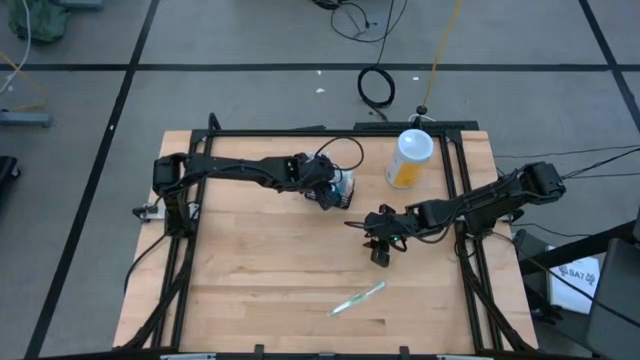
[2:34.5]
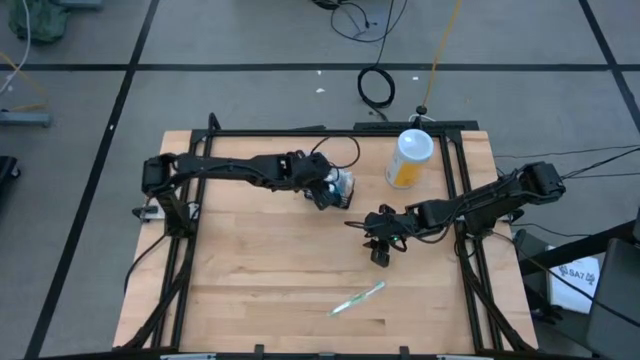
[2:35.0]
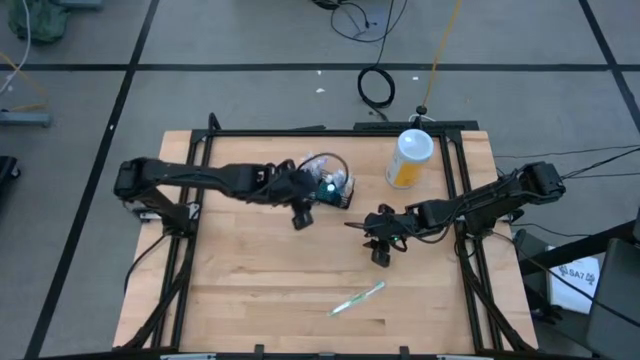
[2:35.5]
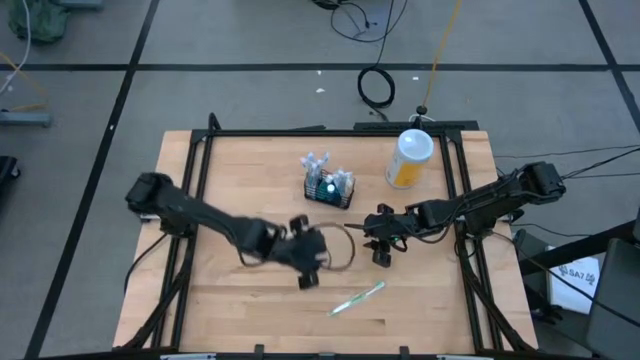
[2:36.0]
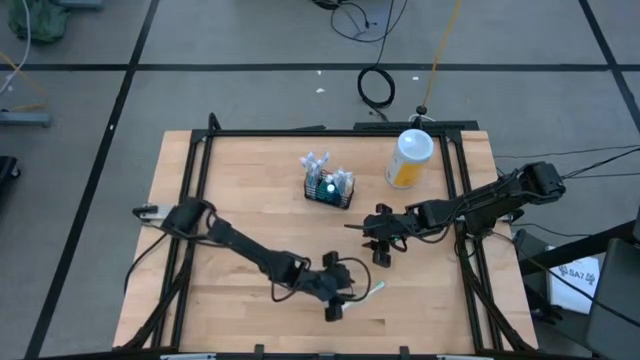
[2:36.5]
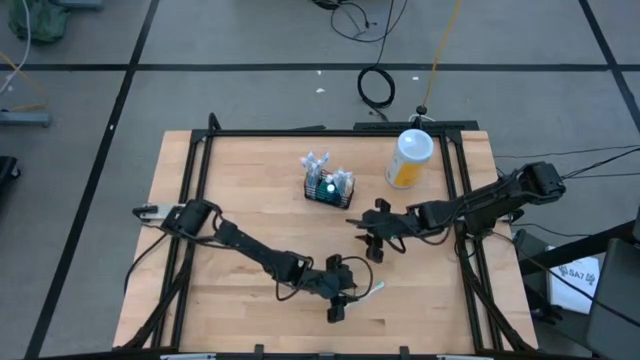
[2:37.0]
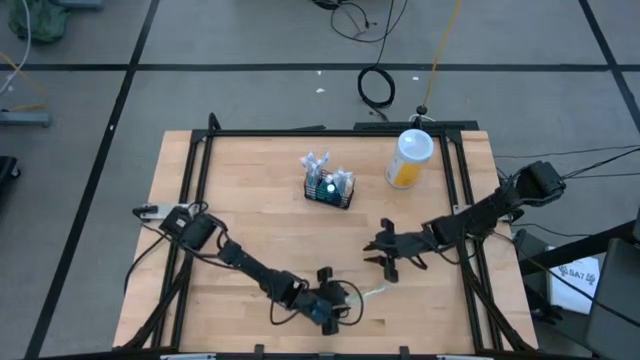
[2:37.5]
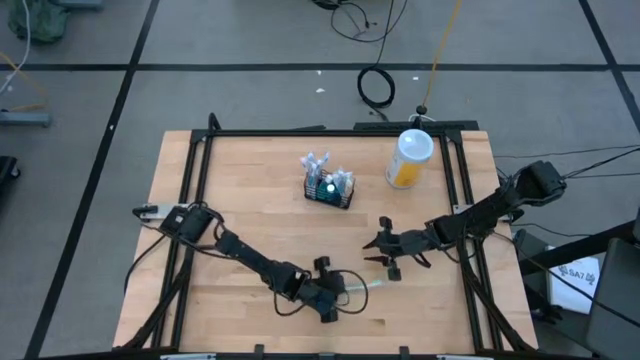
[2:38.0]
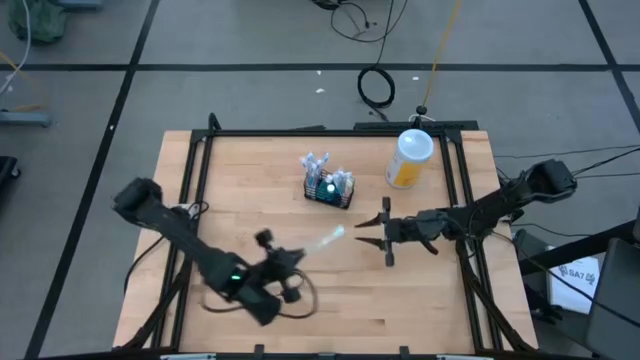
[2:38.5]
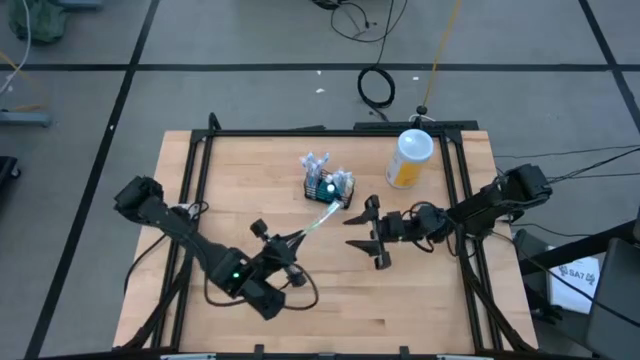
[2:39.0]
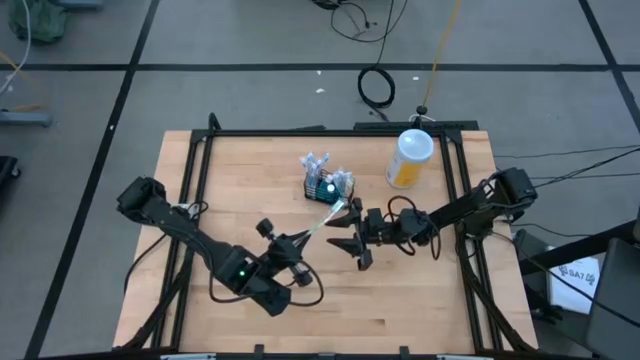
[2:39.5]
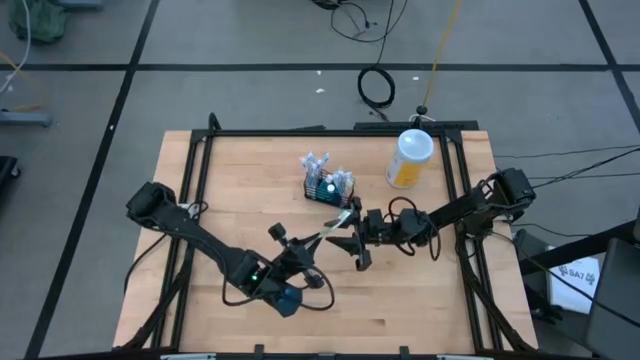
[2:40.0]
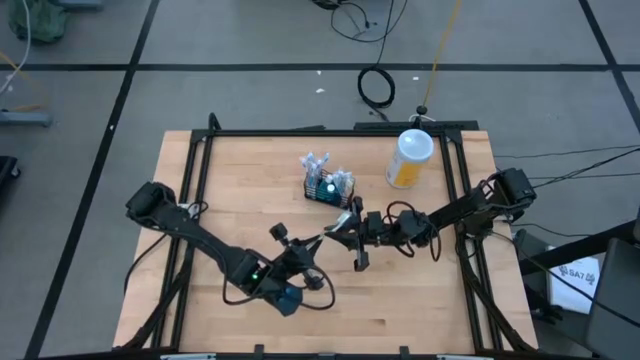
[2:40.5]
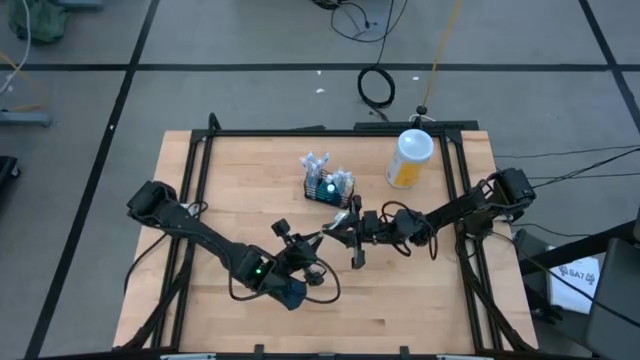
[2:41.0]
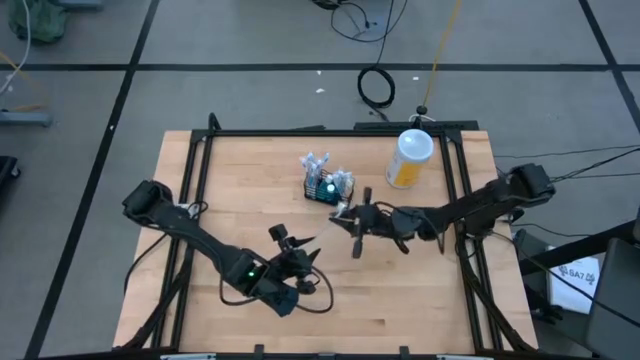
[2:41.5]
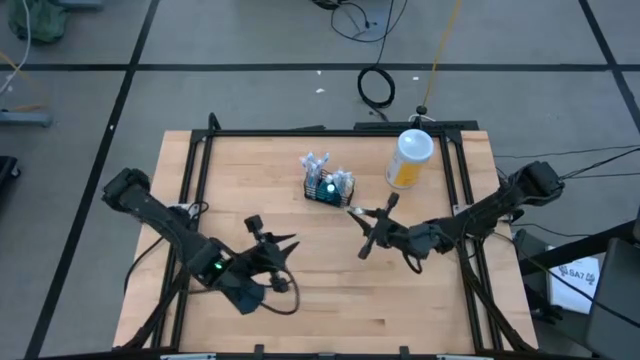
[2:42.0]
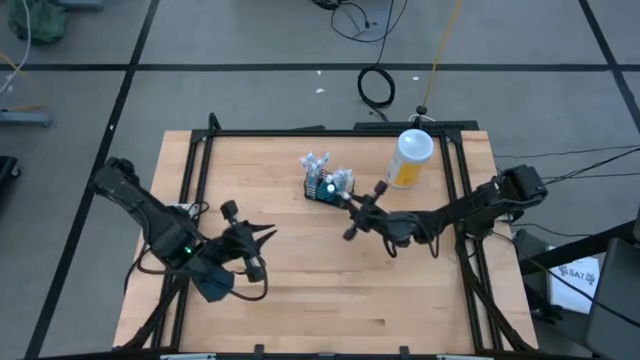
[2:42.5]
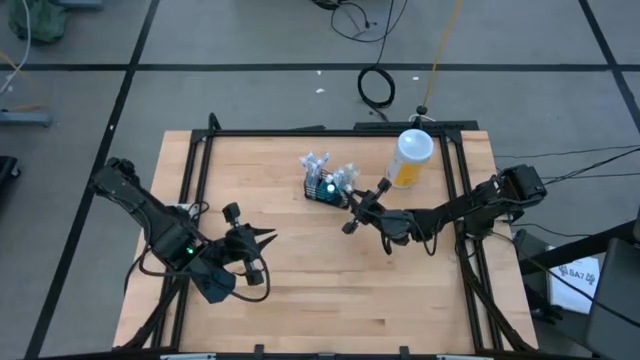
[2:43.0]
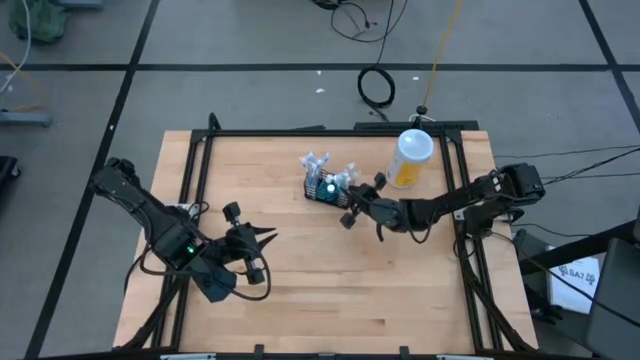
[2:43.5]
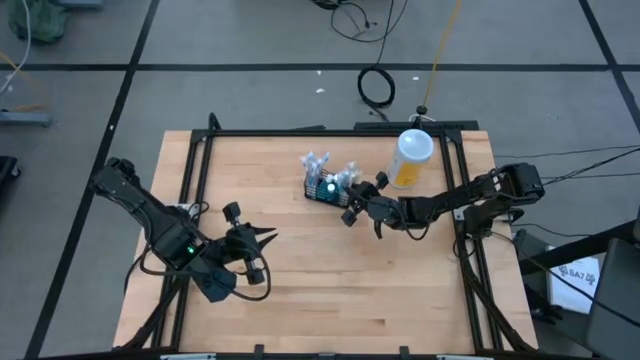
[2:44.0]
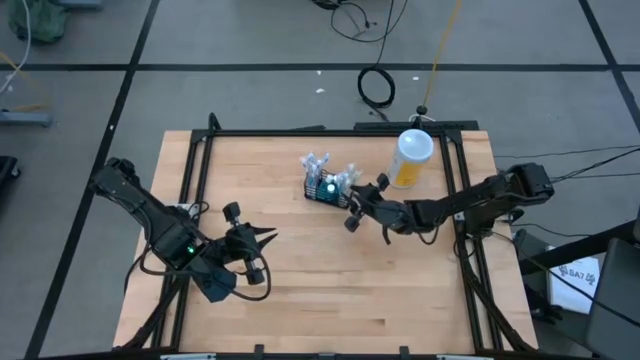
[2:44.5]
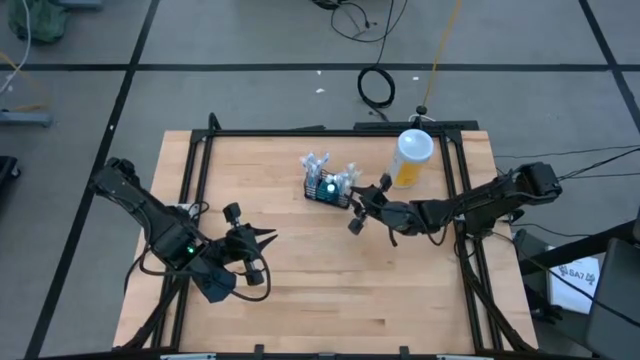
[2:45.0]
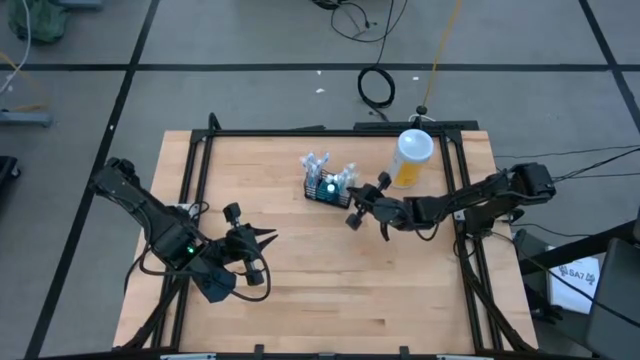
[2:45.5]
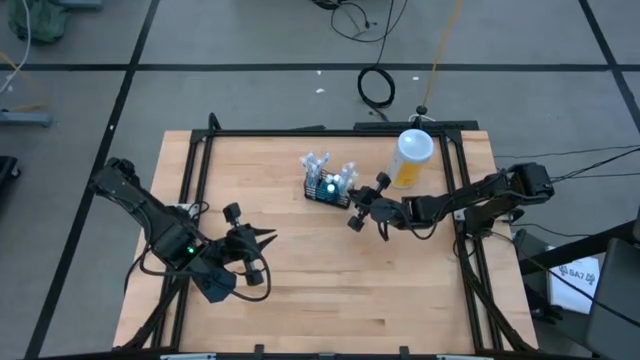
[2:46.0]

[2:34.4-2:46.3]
Task: Pick & Place toothbrushing station
Put the green toothbrush into the black wire organizer

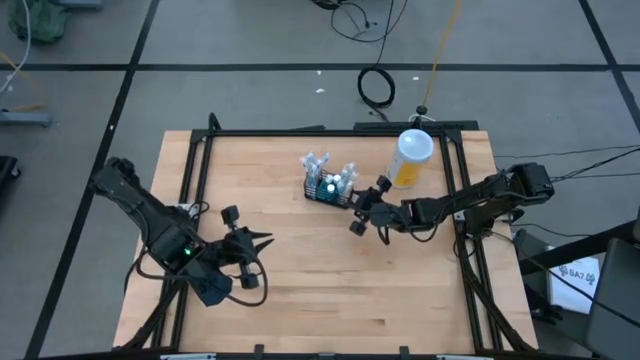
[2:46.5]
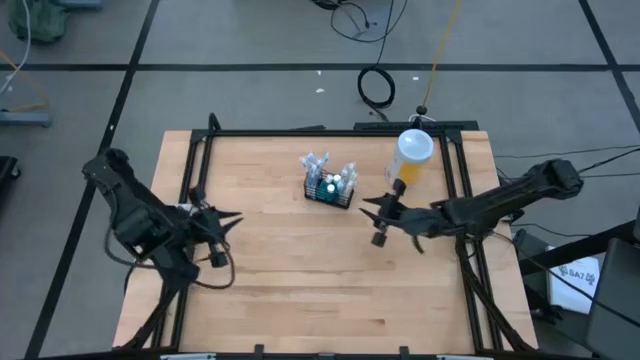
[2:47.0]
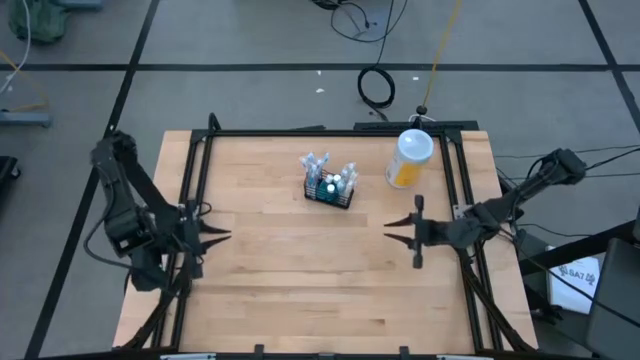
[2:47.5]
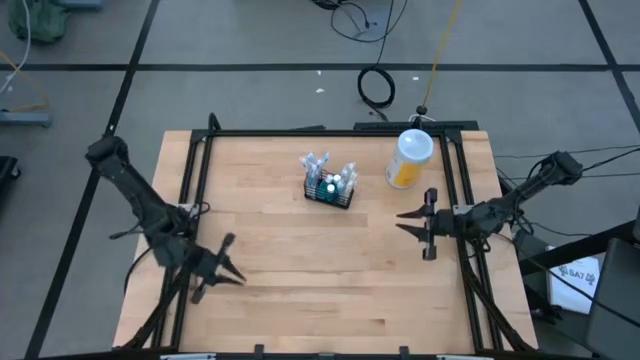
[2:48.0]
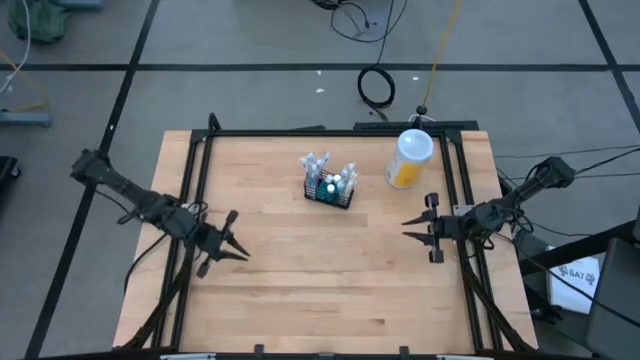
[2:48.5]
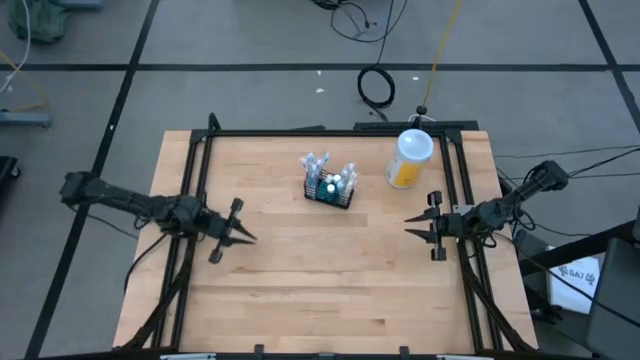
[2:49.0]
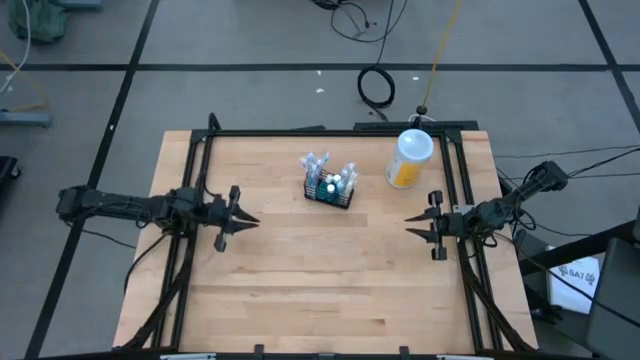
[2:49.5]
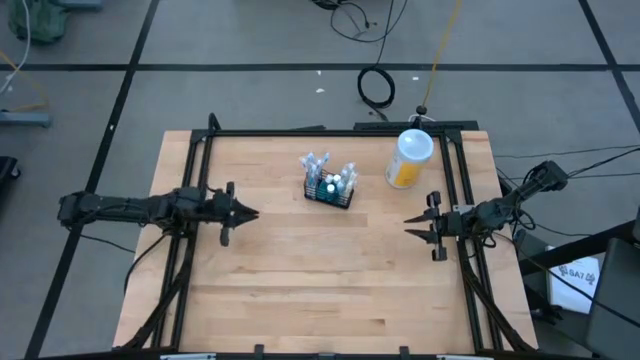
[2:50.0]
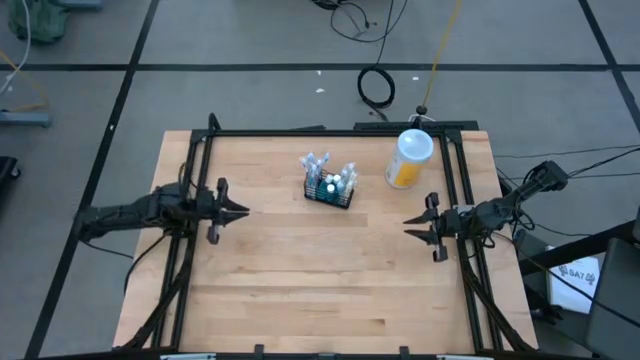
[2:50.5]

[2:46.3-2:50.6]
Return to Home Position

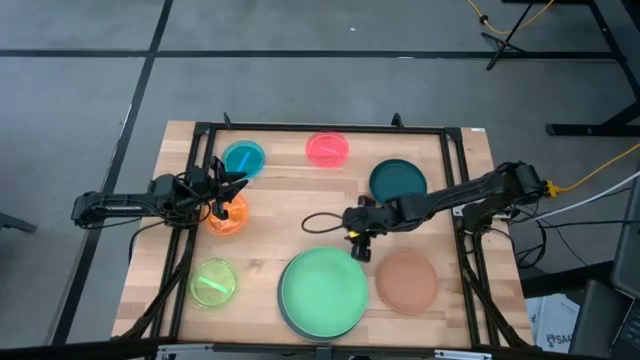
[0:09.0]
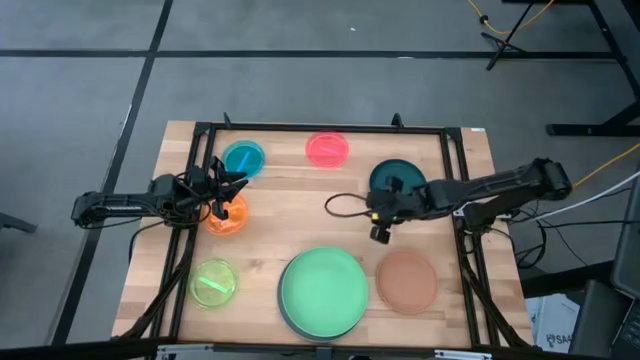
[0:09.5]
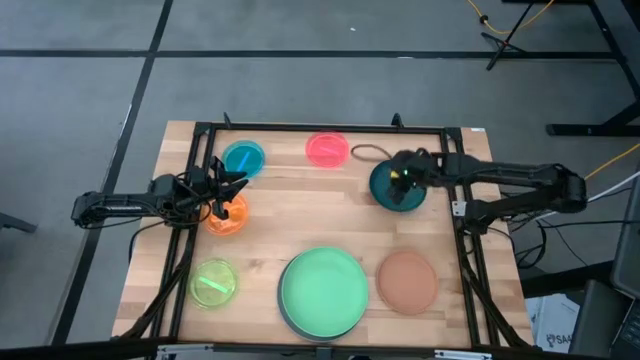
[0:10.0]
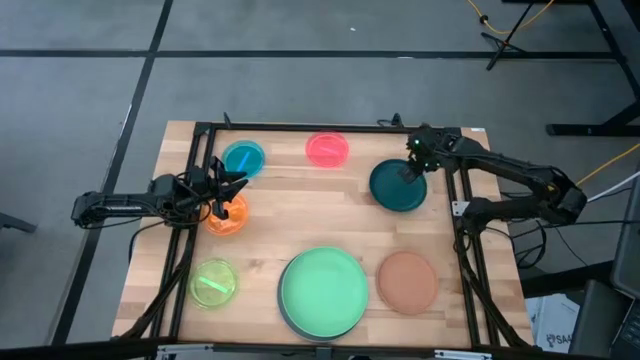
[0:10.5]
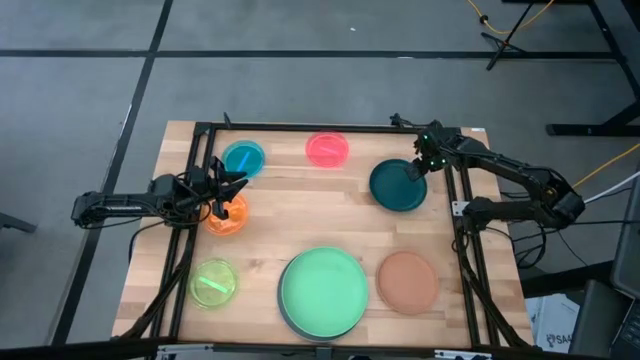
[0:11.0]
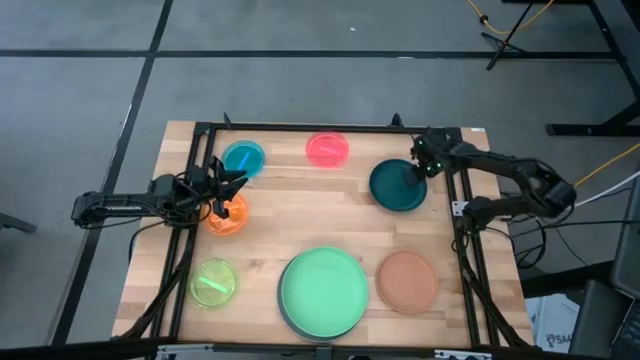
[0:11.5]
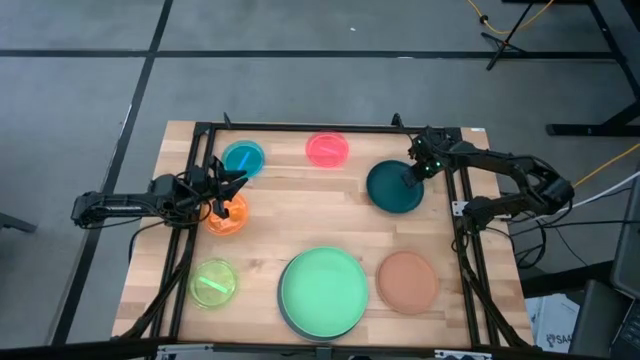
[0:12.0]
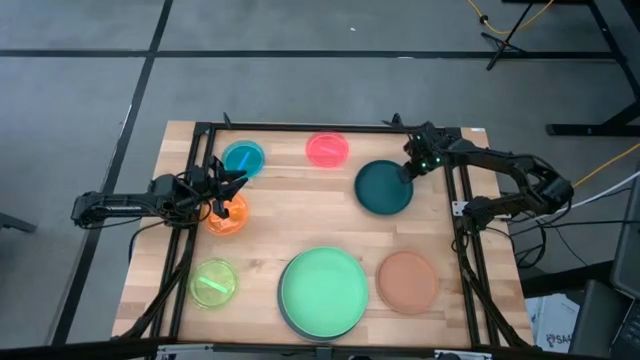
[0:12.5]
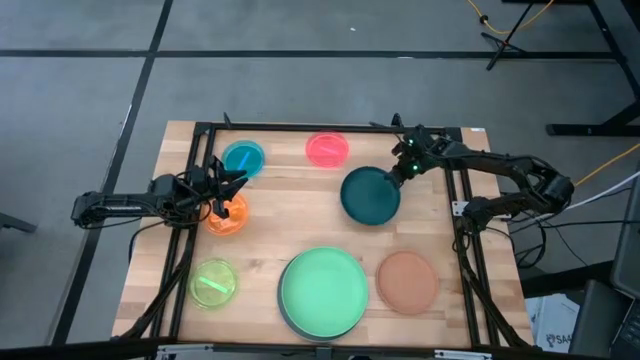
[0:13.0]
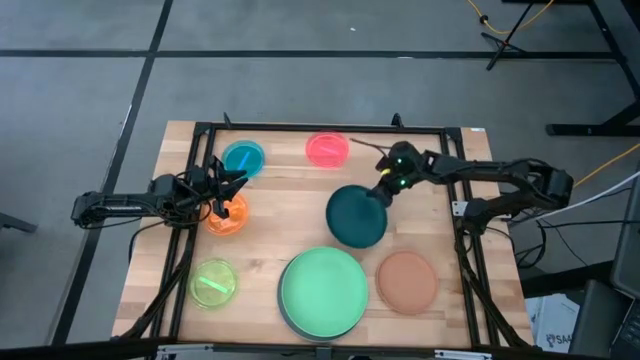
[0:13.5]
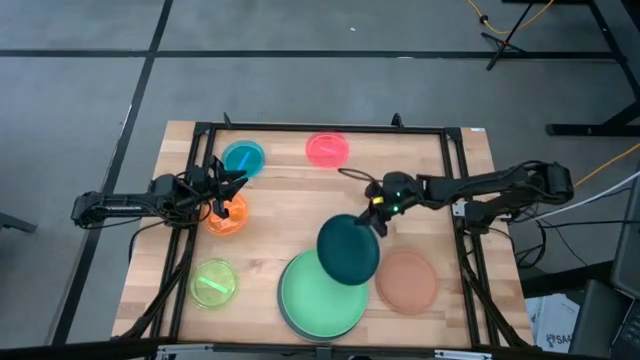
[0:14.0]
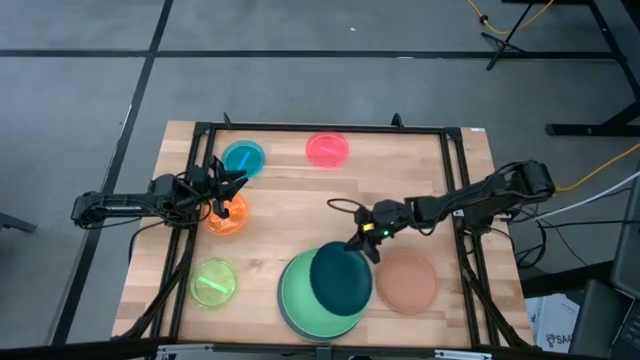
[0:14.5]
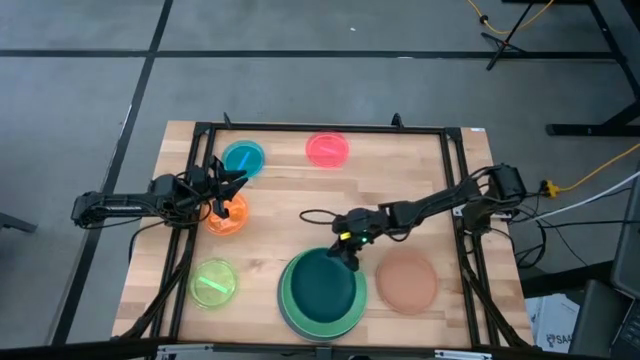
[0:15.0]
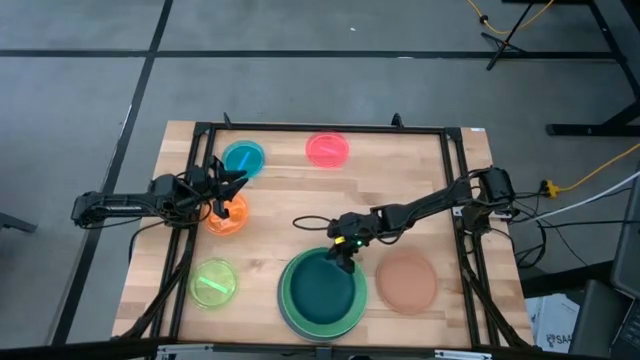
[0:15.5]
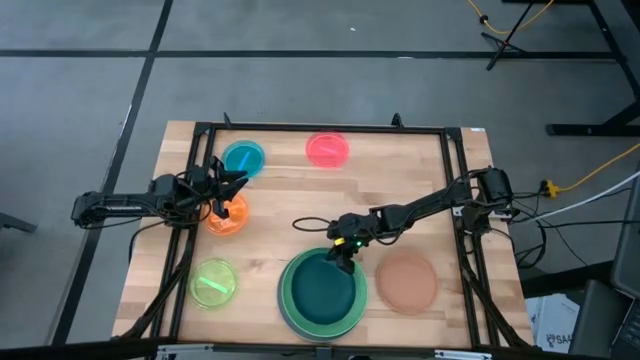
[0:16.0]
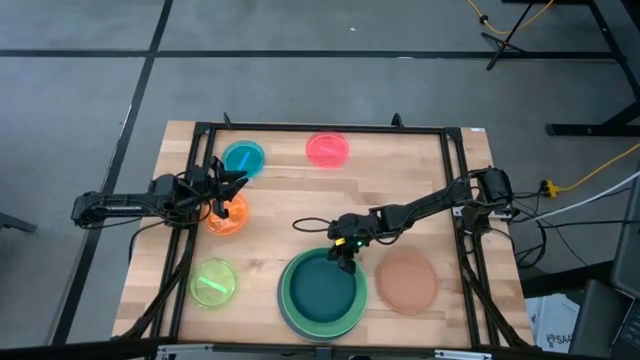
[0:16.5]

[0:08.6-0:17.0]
Task: Stack plastic plates
Stack the dark blue plate on top of the green plate
